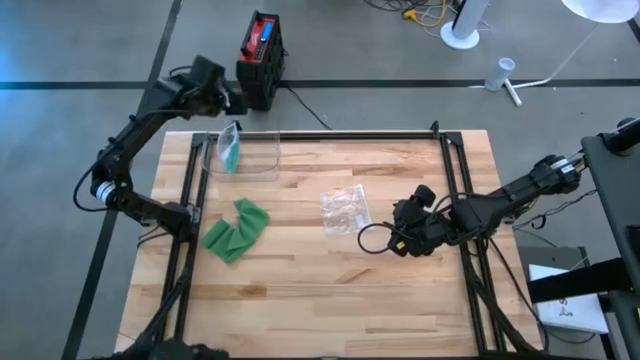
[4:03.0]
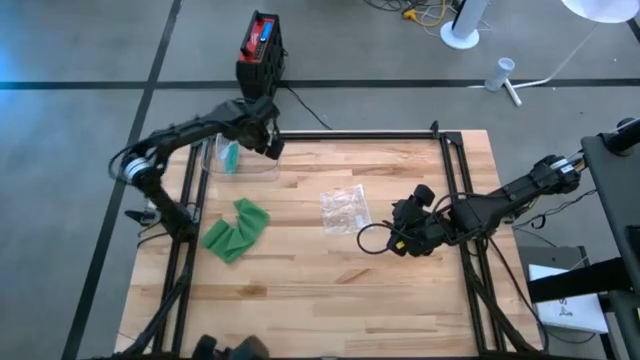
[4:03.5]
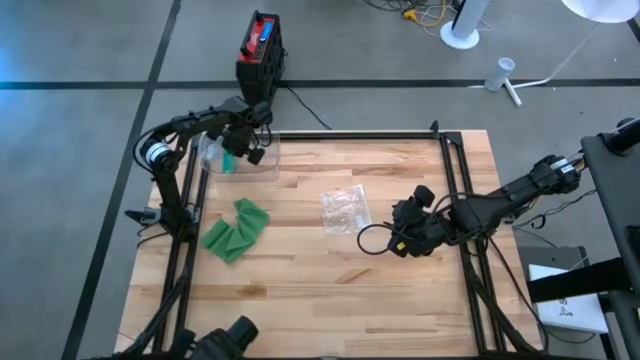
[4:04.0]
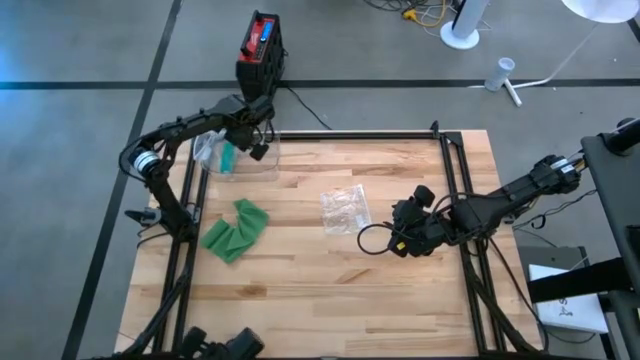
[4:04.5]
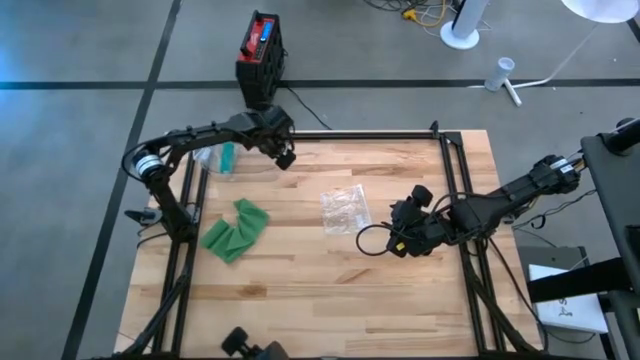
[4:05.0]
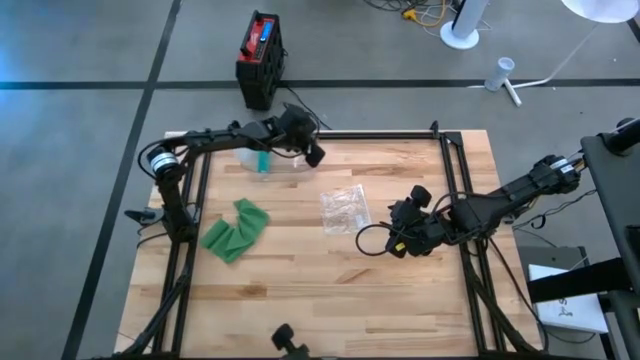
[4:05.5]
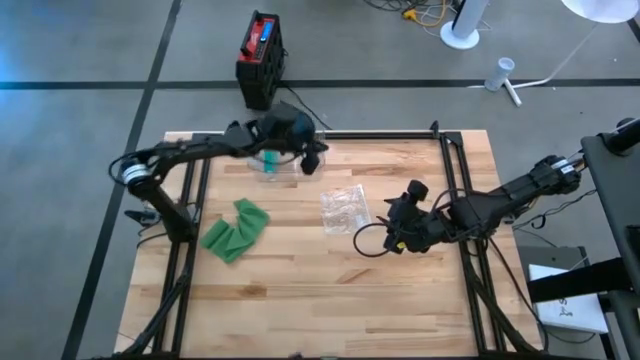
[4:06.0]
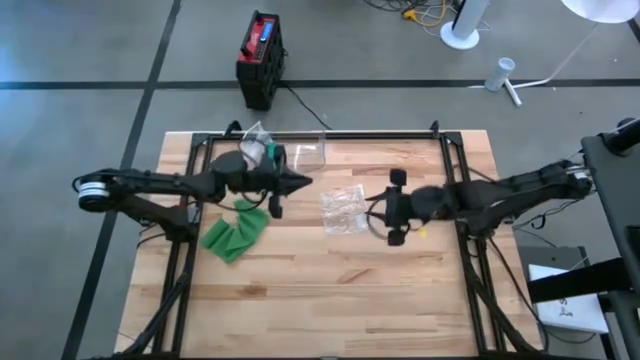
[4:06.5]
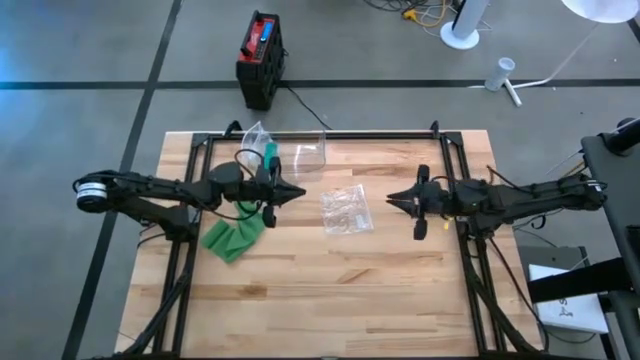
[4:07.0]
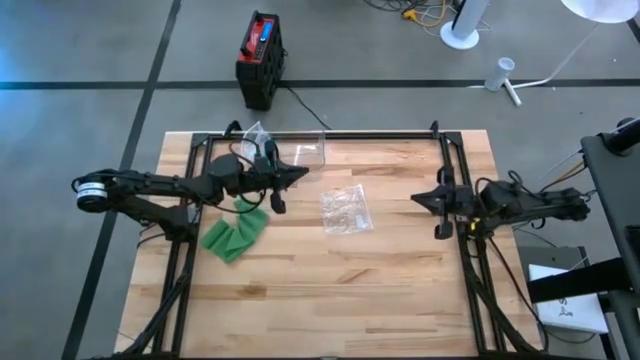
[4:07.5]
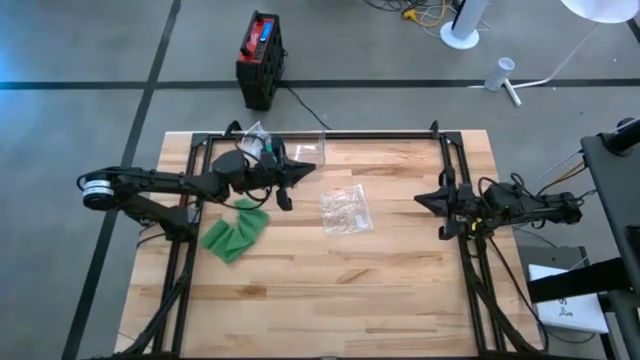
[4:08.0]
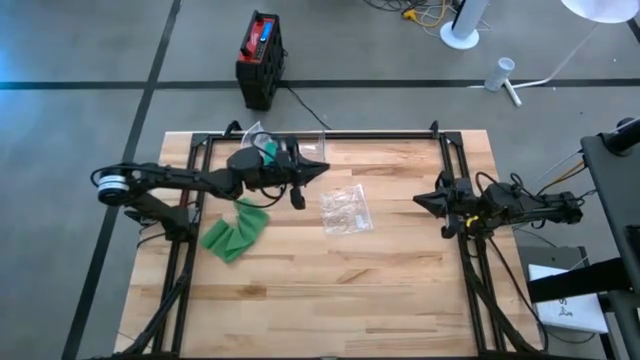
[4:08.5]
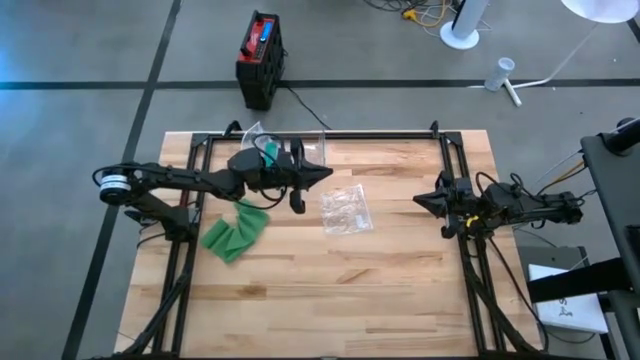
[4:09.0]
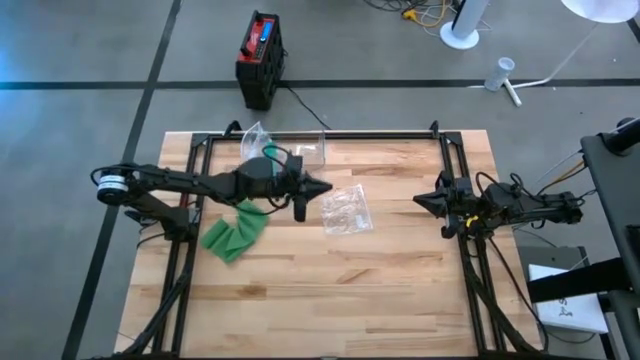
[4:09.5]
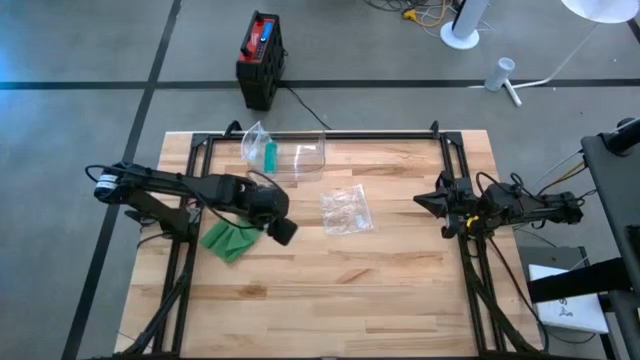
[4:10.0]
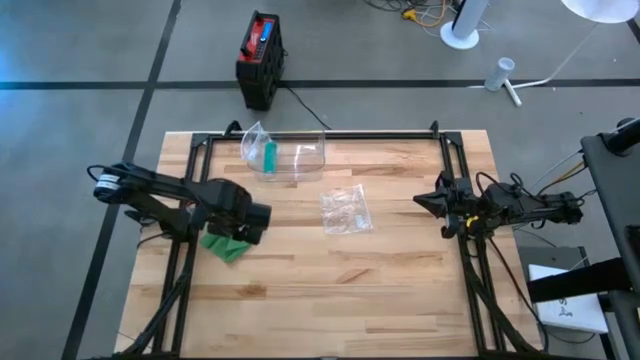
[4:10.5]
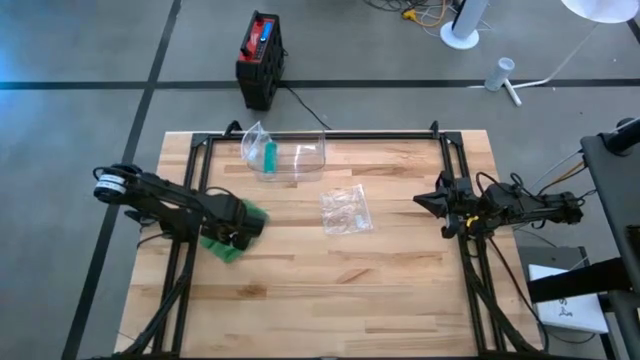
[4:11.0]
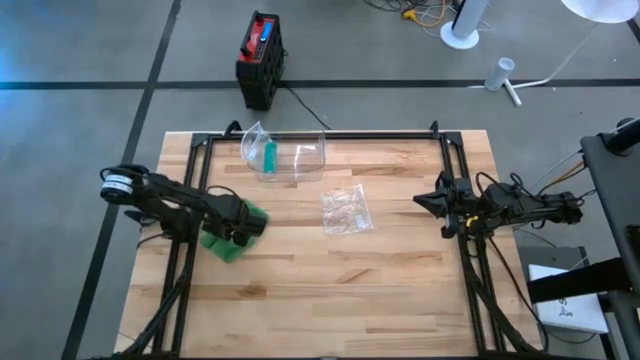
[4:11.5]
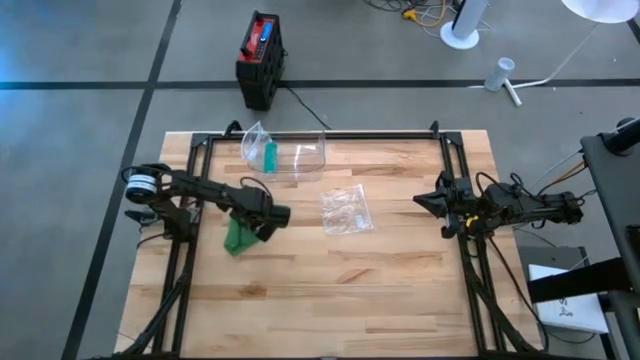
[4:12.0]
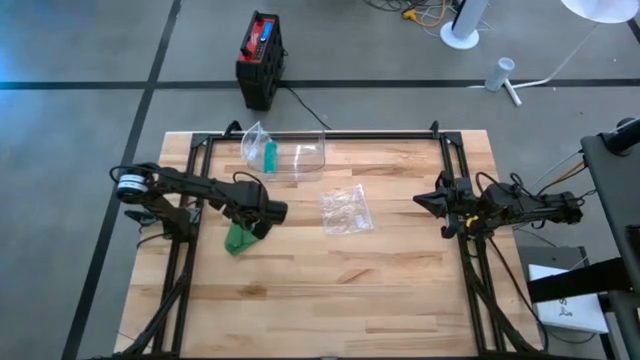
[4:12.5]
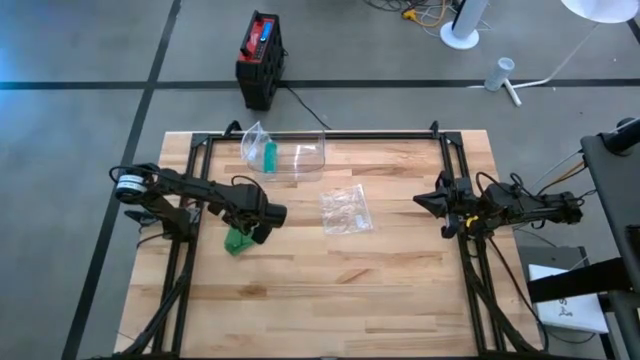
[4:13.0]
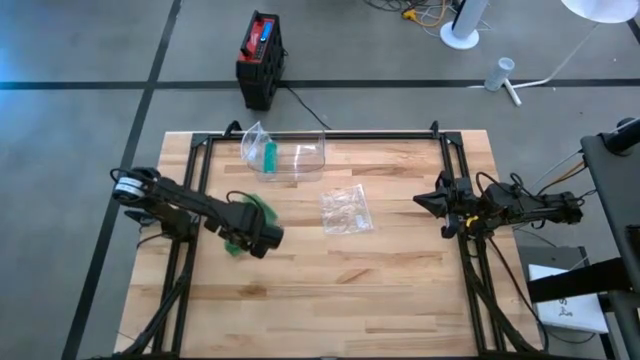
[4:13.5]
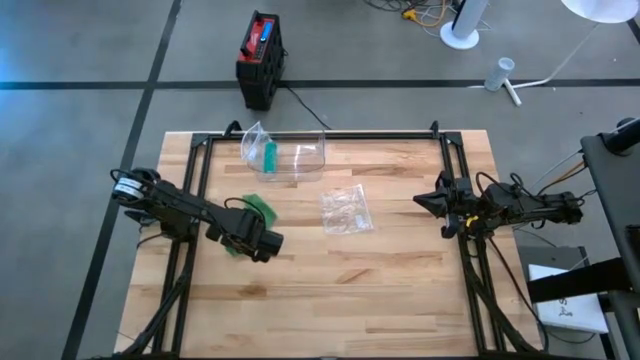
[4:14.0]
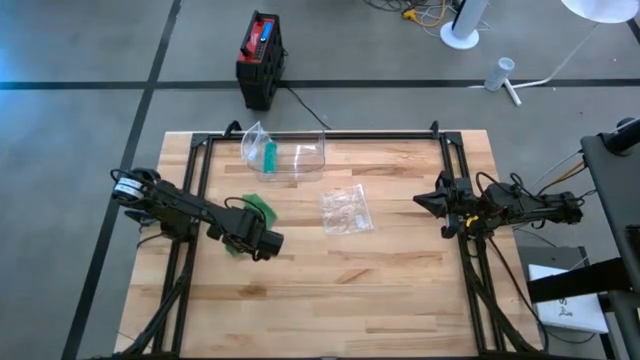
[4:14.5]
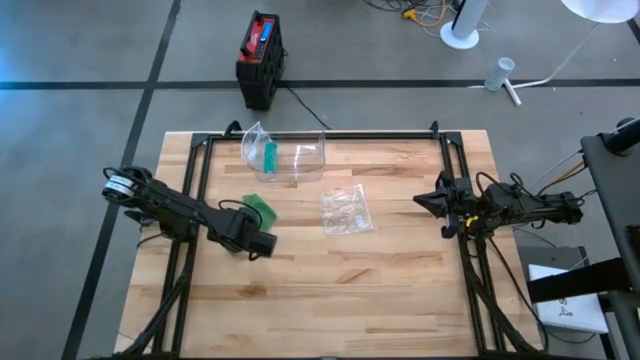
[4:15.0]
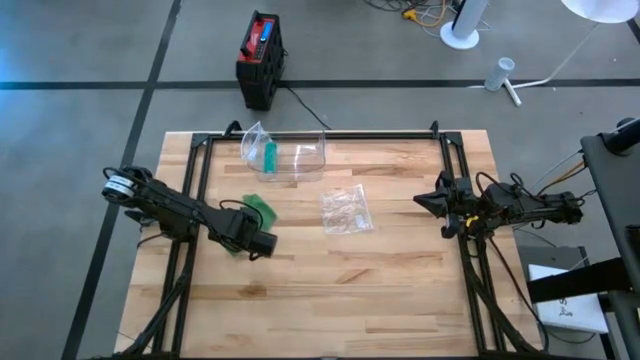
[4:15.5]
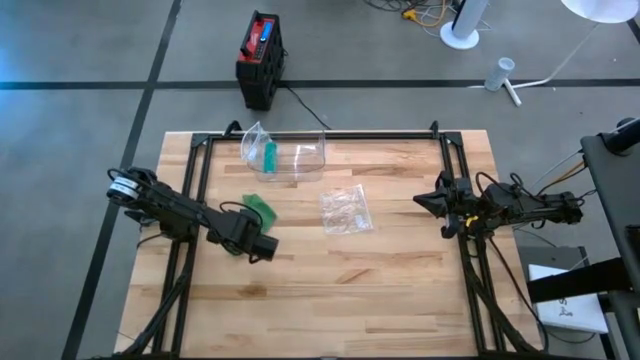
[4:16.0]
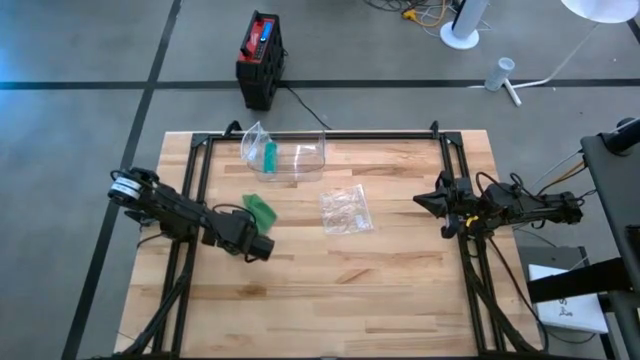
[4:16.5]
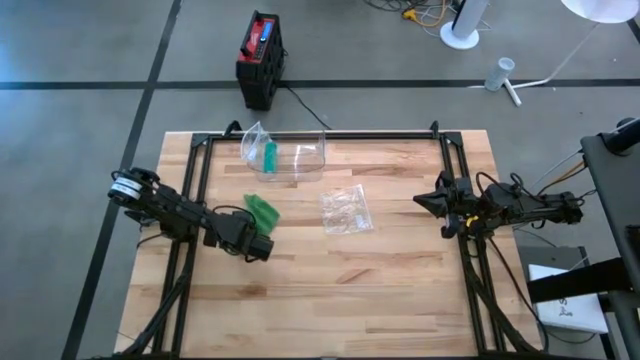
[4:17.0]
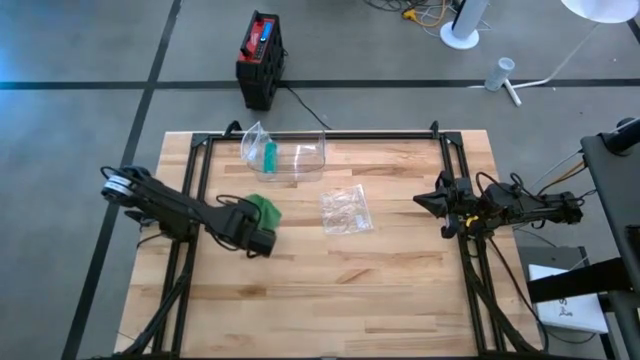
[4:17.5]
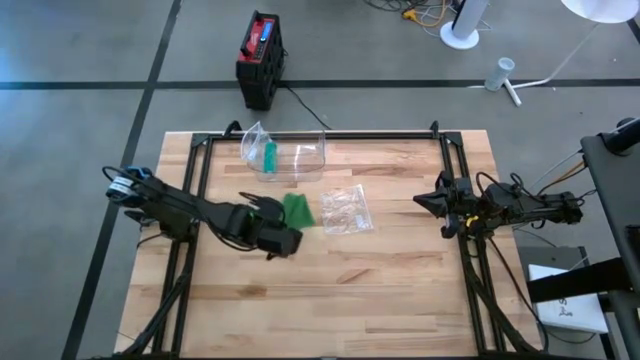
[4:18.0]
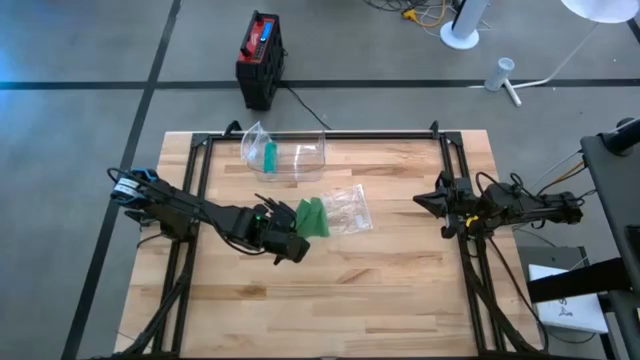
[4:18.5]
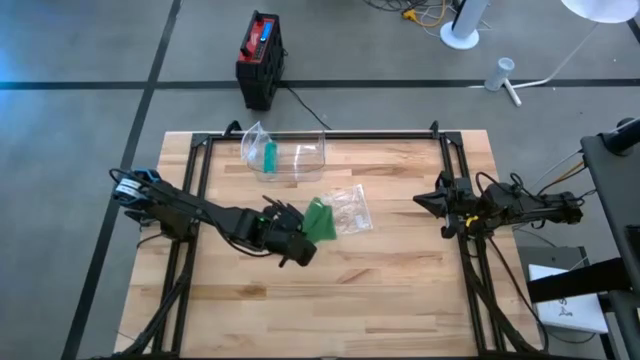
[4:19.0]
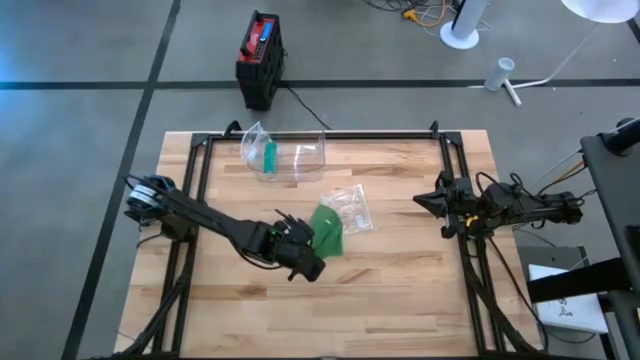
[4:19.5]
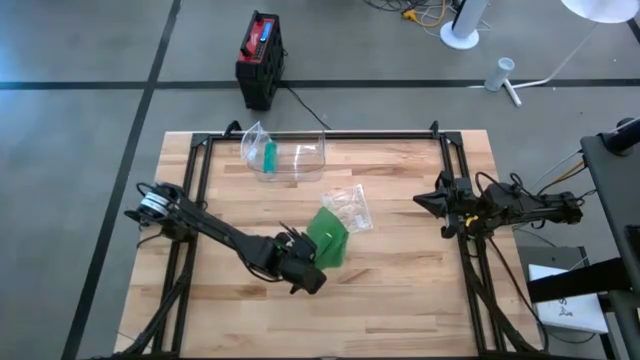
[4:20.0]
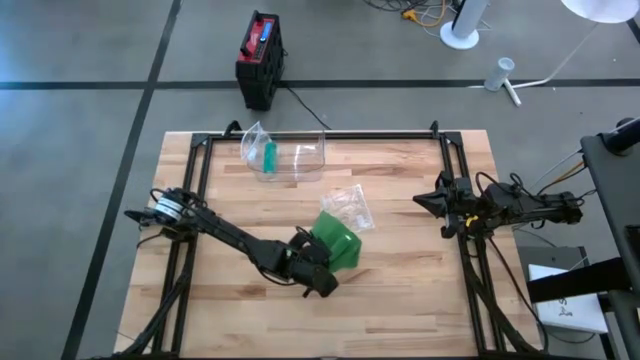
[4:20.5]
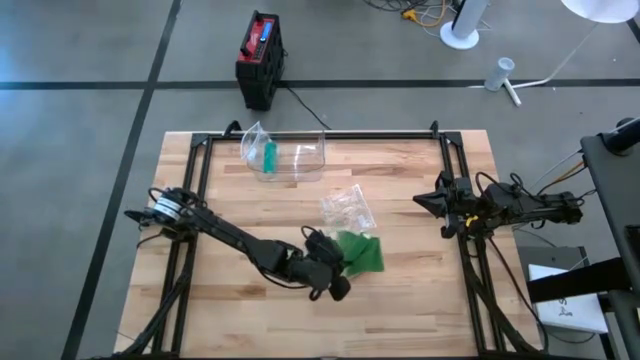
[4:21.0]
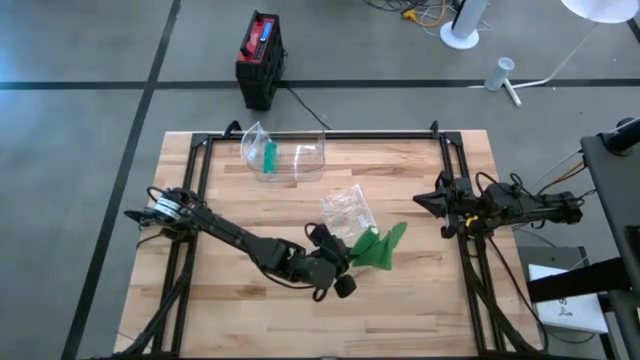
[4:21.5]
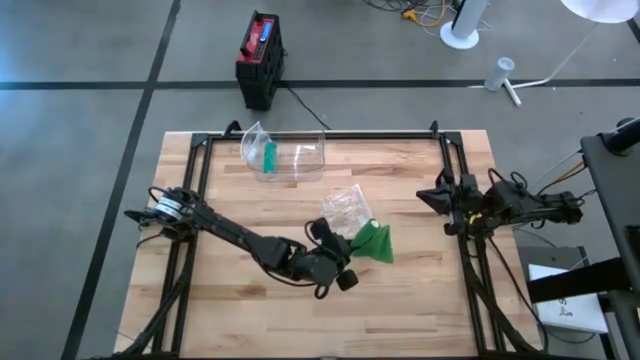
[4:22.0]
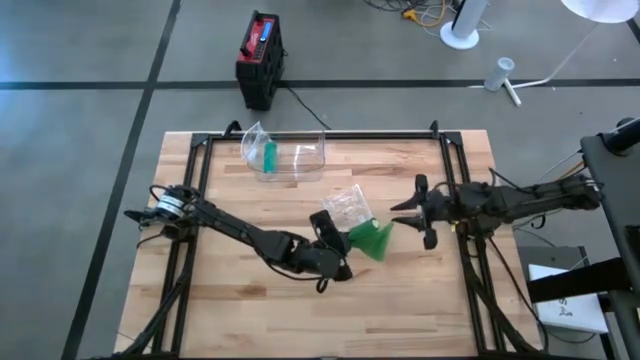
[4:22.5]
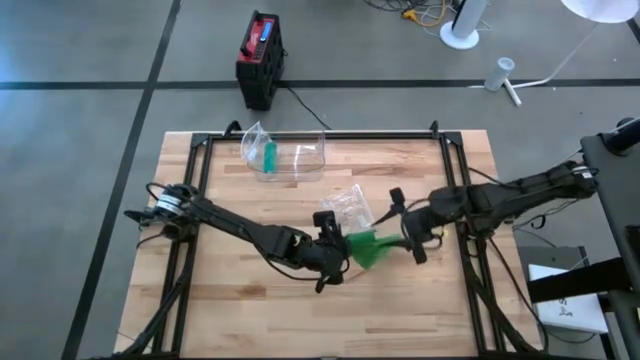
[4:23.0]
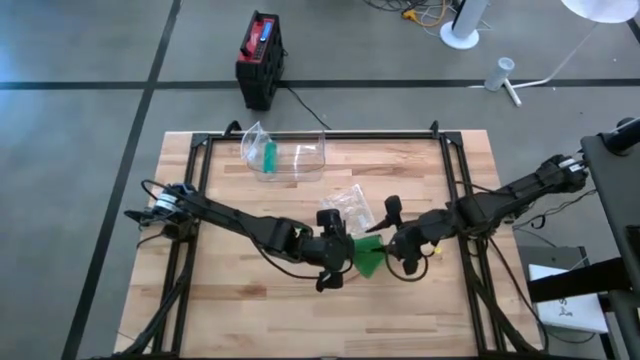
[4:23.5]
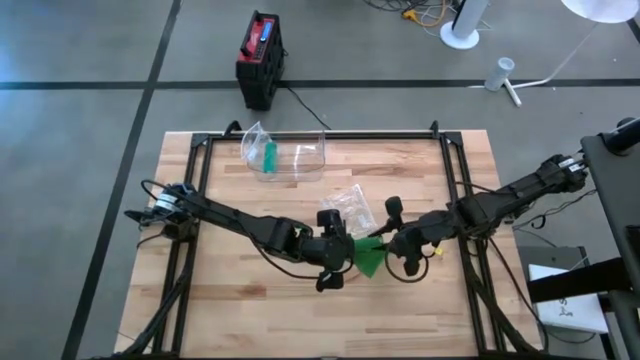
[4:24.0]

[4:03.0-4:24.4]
Task: Roll bandage
Roll the green bandage
